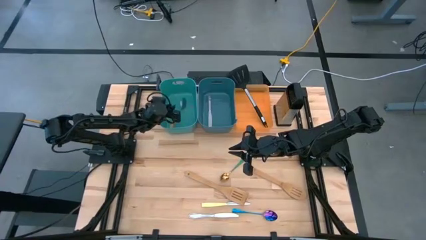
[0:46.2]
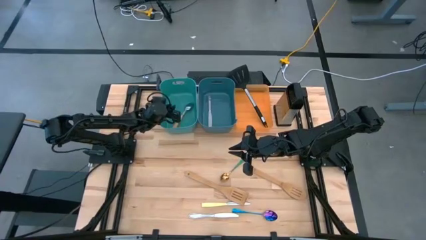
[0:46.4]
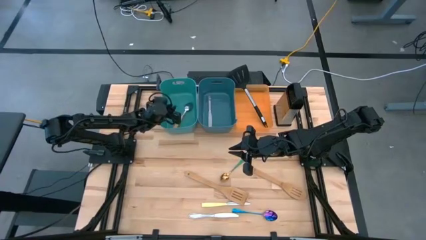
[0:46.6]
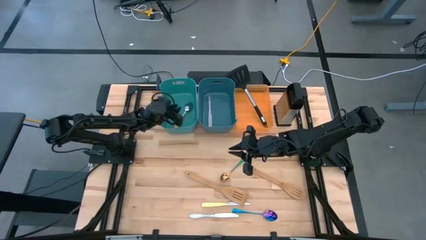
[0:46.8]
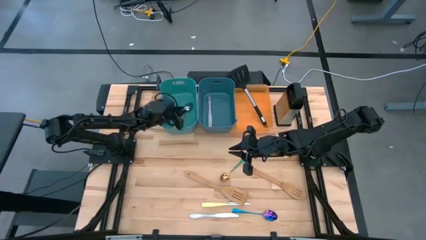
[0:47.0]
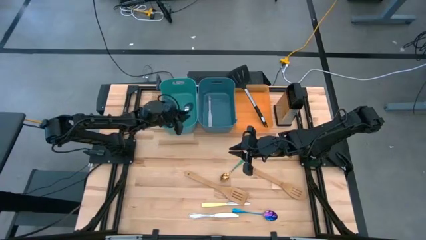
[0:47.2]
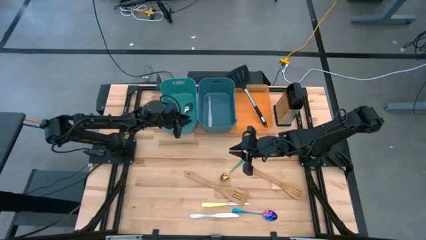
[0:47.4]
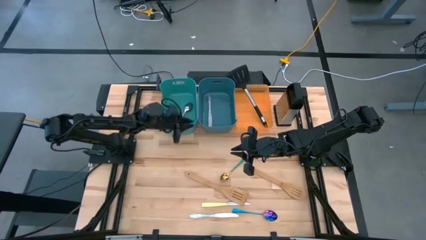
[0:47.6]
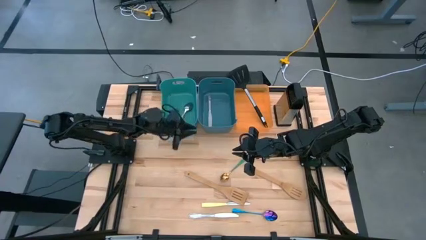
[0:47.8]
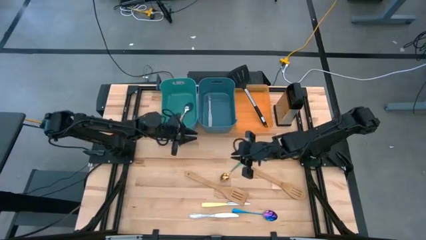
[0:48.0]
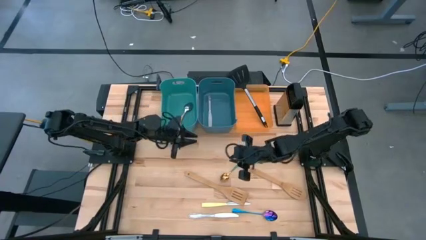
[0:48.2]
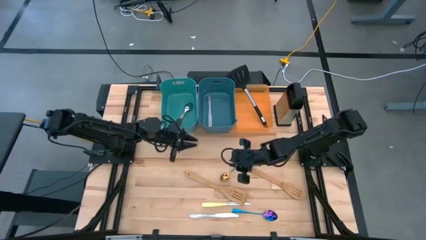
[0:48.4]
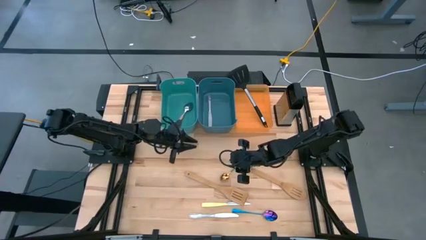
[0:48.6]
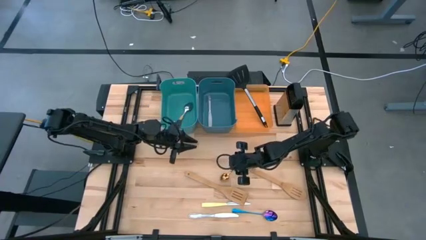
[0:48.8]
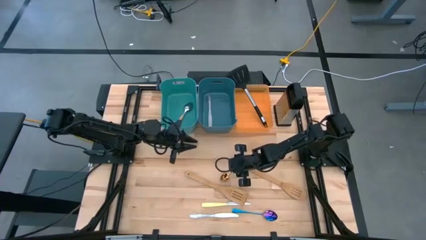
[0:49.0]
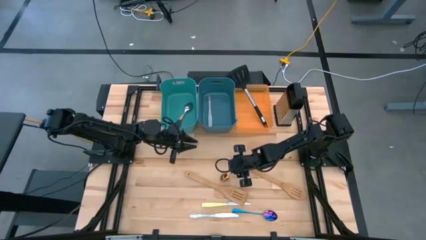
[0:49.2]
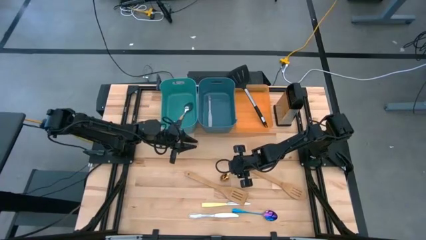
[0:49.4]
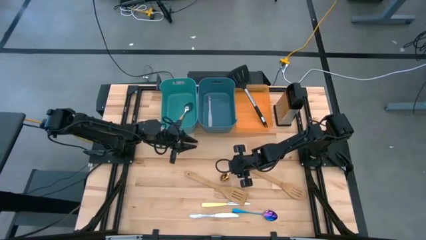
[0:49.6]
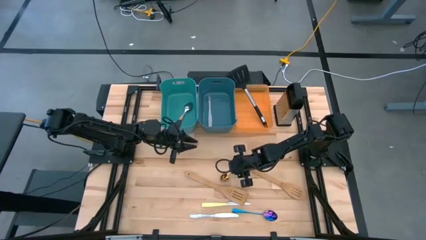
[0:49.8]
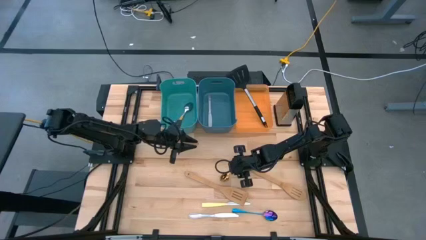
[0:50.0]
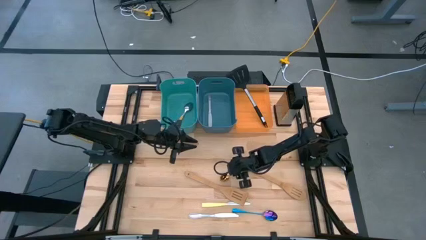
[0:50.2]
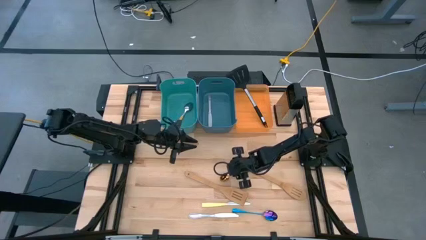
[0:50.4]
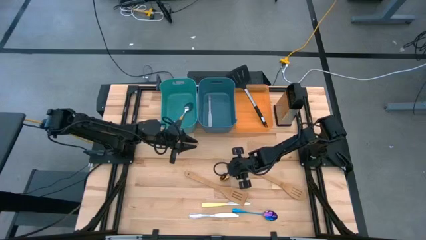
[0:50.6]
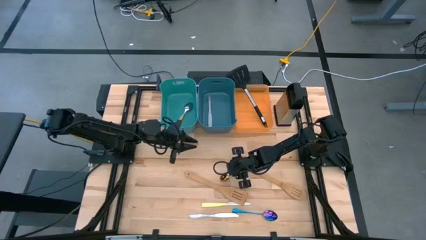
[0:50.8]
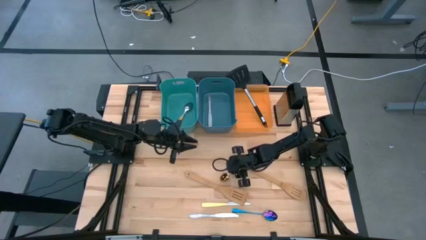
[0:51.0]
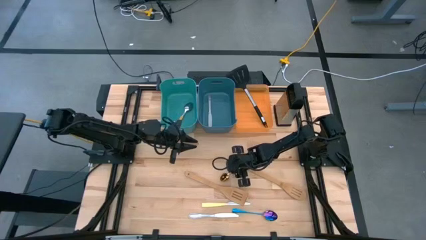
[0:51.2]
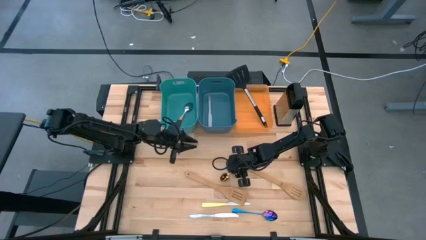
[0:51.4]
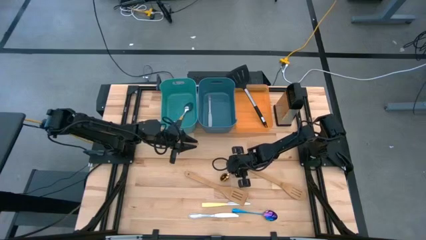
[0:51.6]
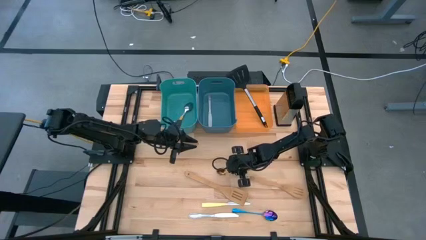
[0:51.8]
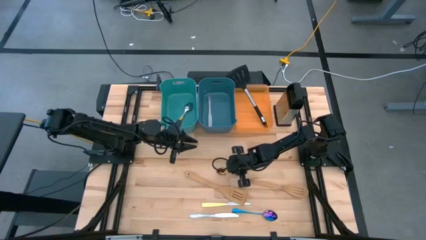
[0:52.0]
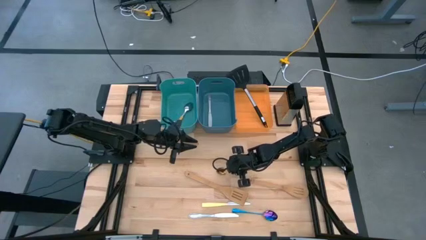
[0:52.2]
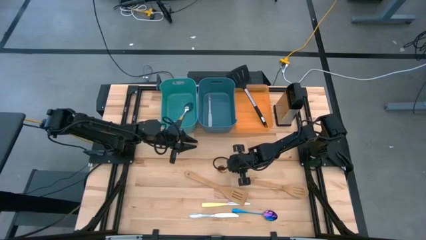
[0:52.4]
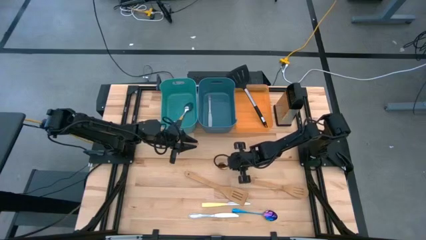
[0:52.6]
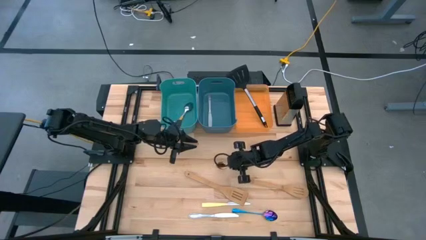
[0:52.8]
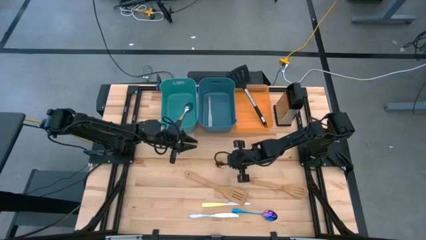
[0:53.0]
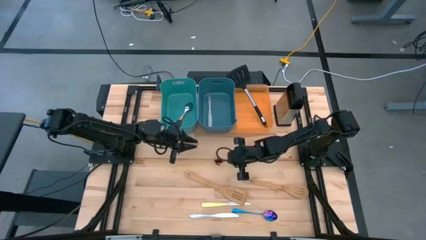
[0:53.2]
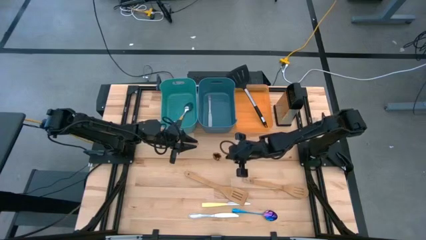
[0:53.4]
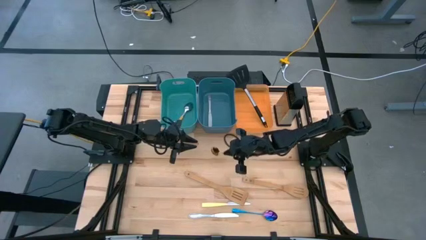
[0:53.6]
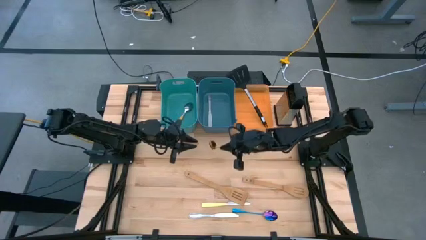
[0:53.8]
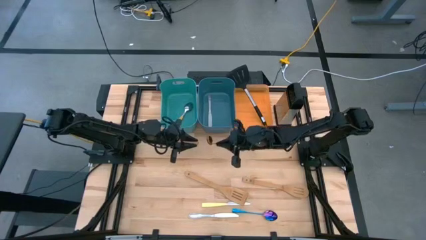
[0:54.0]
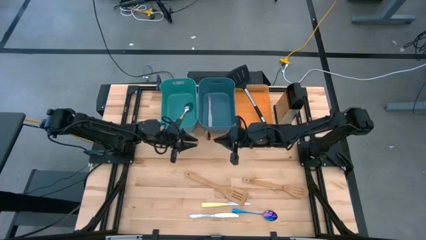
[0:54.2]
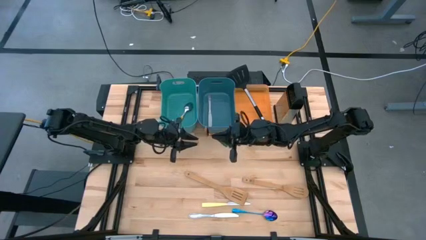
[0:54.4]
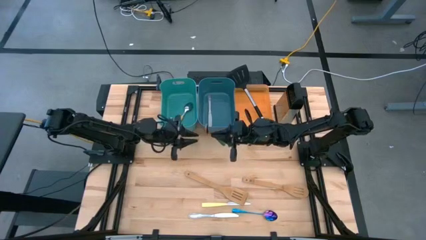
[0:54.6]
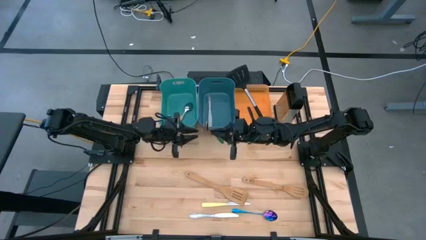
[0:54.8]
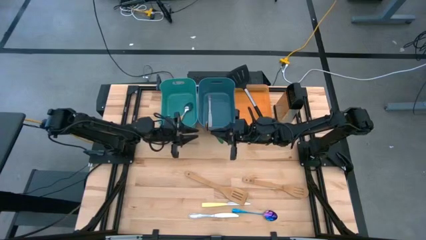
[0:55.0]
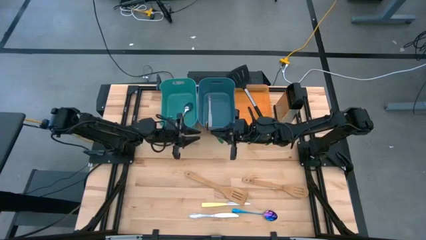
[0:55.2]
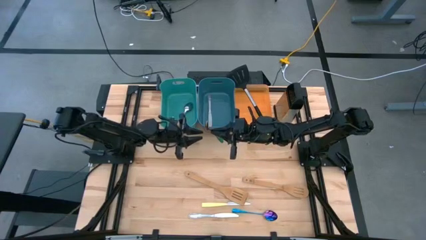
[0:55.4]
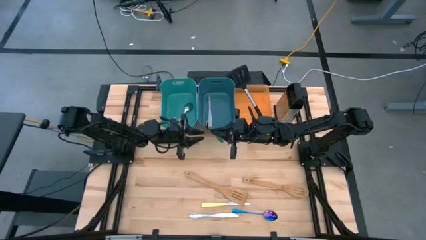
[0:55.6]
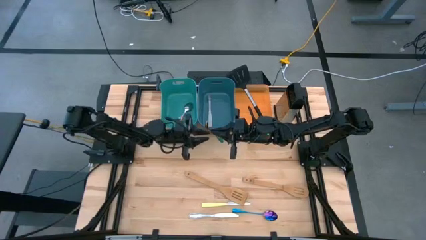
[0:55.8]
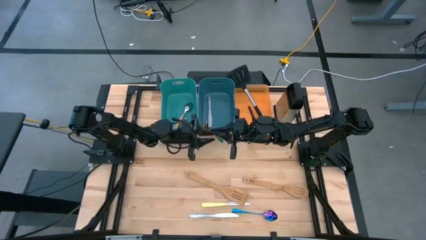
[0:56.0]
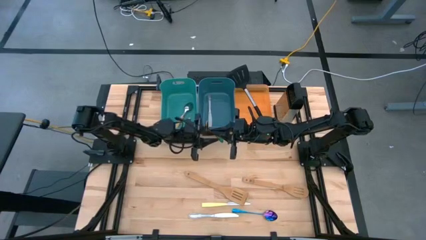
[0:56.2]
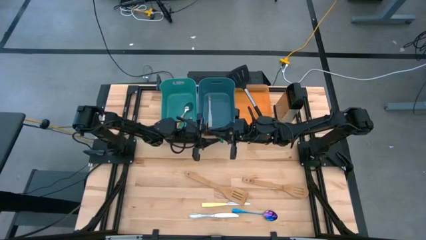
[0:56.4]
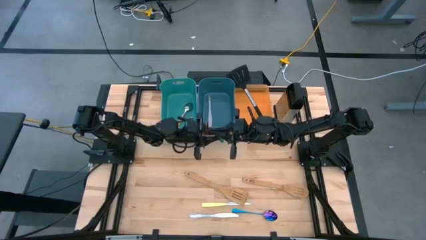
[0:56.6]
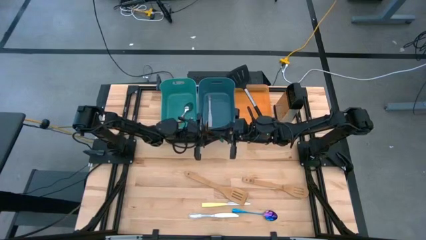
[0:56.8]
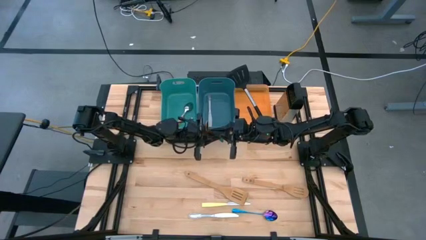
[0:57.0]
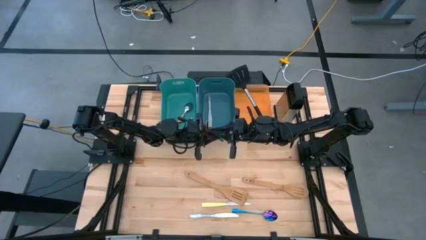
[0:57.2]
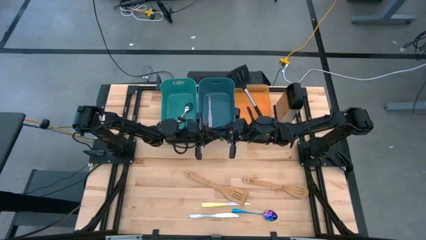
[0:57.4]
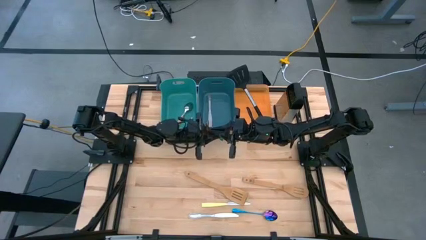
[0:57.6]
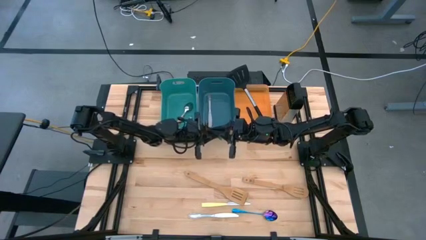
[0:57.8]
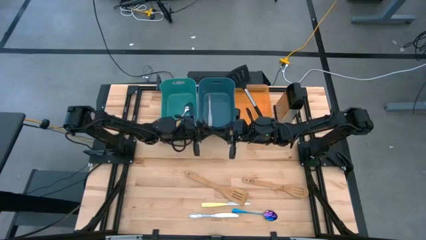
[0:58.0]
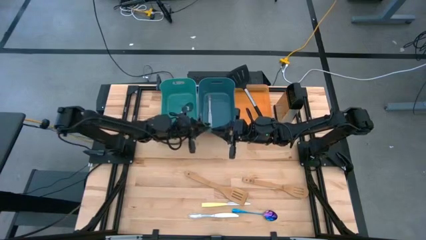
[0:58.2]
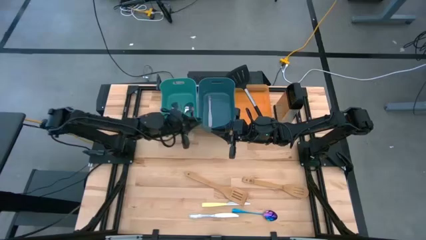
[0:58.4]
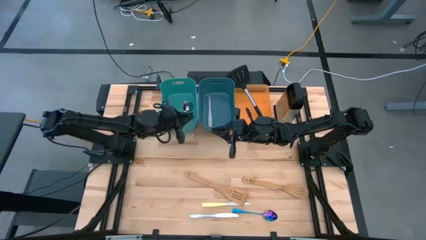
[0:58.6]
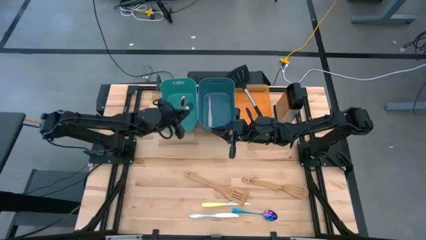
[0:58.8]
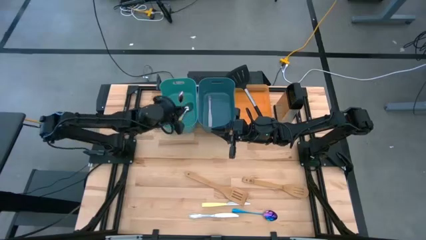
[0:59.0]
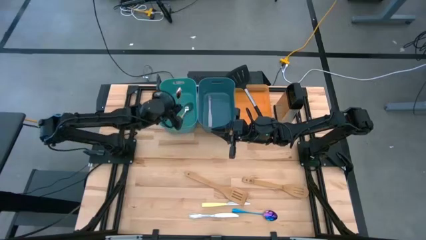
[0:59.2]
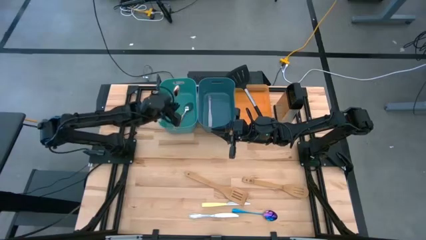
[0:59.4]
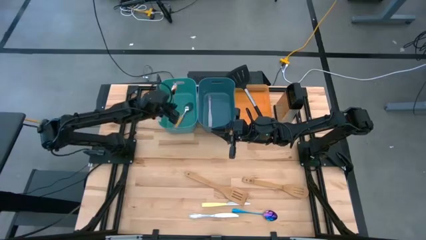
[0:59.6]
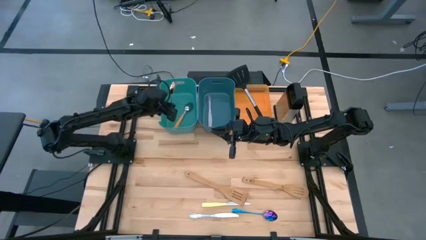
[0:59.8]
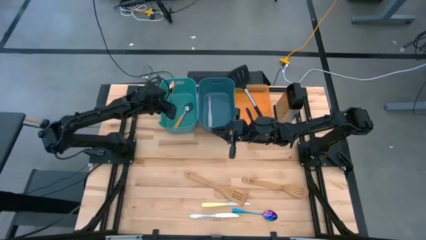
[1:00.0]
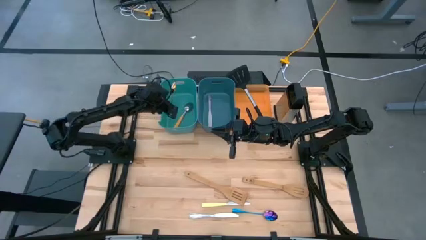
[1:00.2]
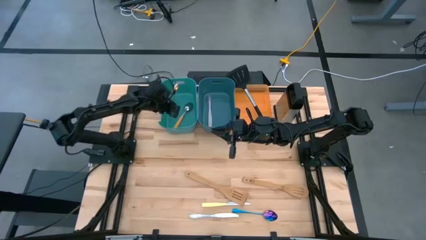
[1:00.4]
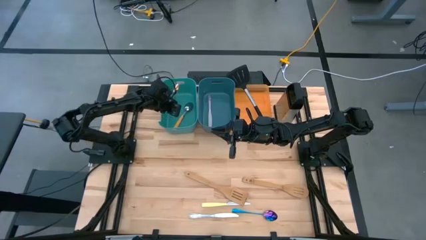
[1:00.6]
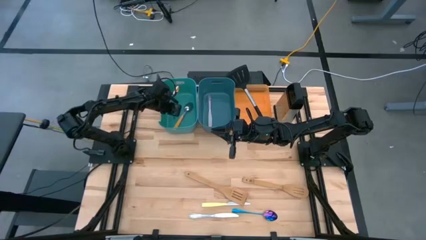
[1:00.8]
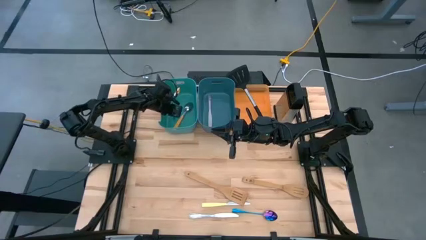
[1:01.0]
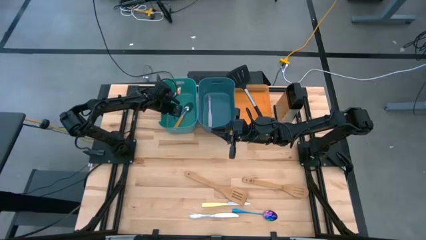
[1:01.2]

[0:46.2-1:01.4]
Task: Pick & Place Kitchen Items
Put the green spoon into the green bin

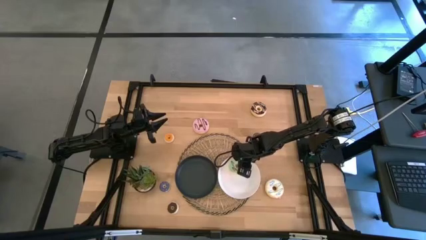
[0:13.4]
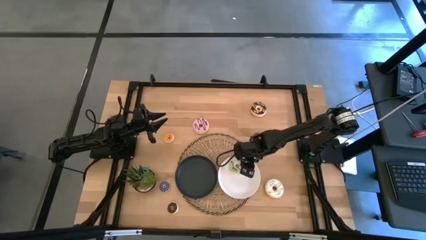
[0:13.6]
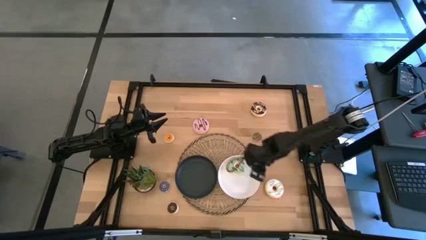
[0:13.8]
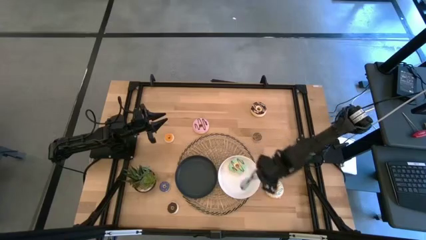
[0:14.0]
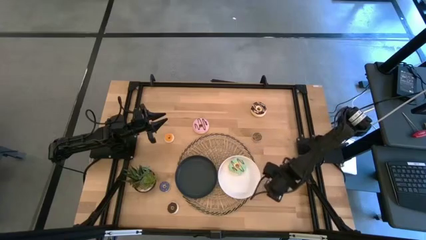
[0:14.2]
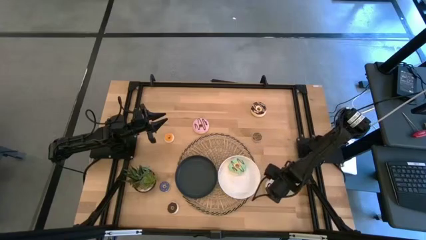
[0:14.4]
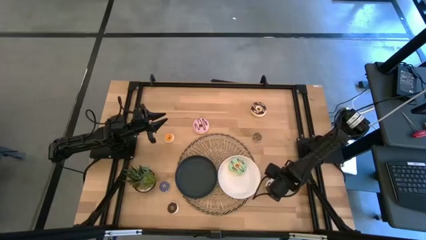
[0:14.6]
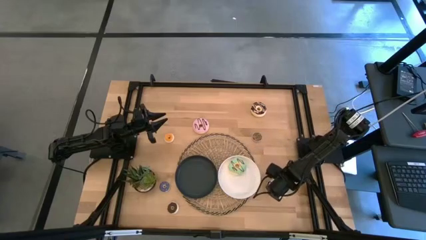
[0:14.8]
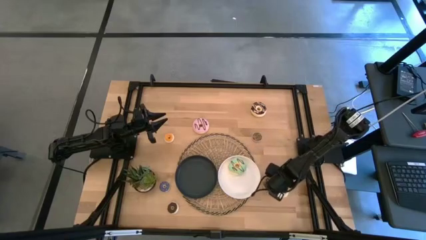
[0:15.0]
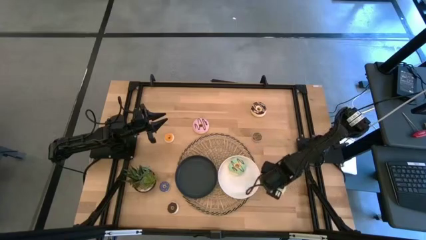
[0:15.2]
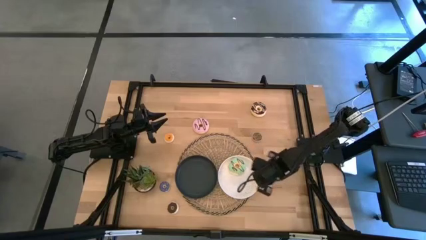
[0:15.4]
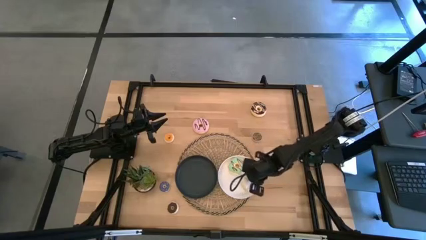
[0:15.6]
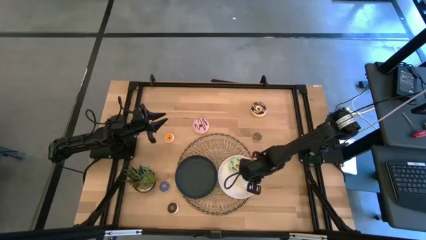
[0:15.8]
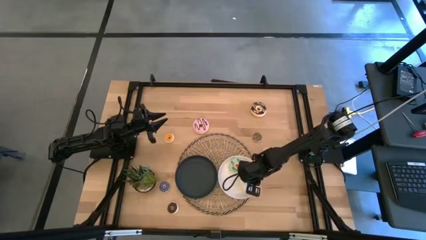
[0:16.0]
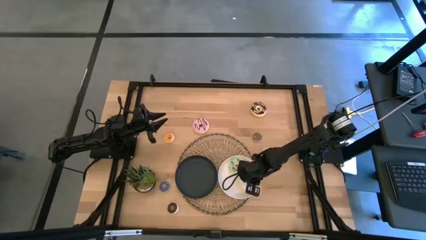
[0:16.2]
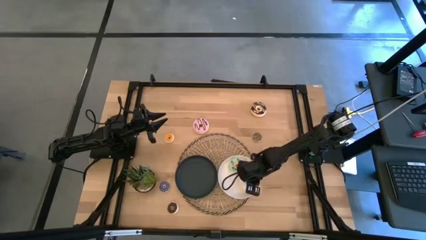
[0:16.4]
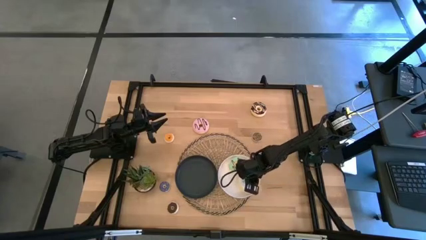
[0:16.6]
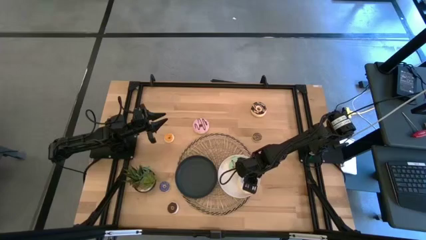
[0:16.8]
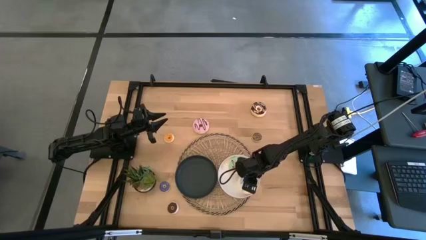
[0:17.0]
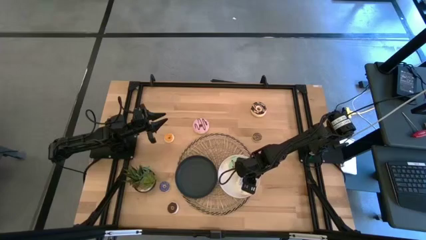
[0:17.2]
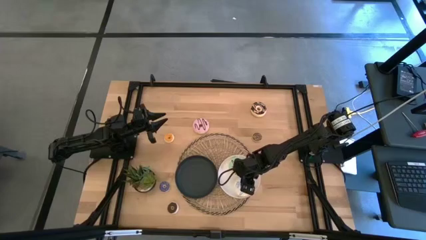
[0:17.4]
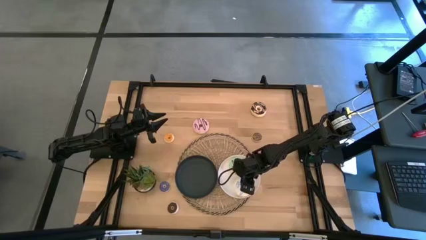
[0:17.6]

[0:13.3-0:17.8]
Task: Pick & Place donuts
Put the large white donut on the white plate
